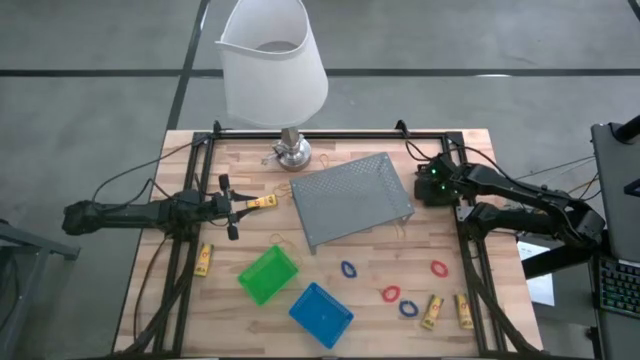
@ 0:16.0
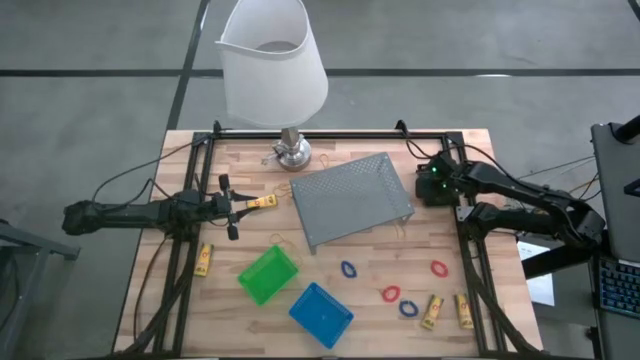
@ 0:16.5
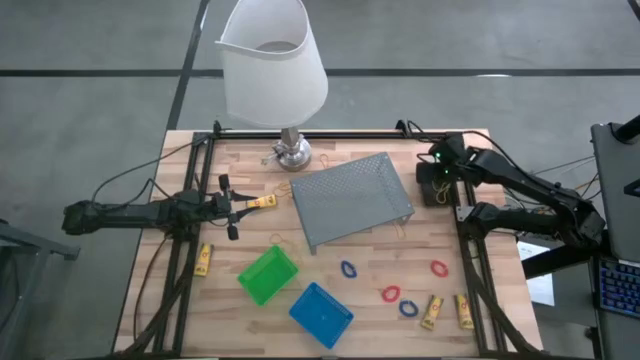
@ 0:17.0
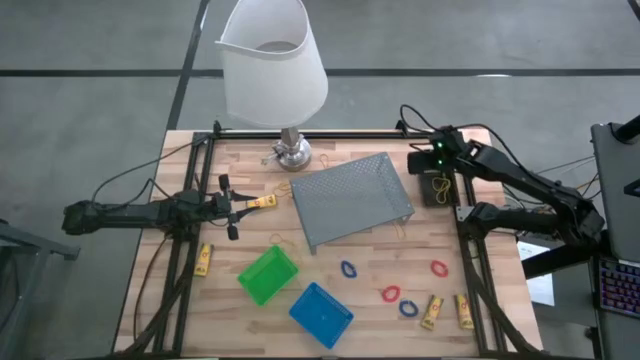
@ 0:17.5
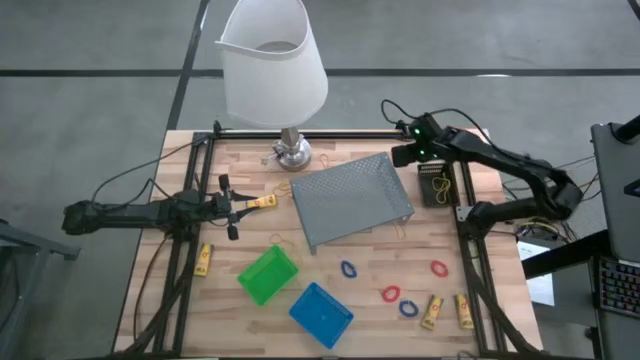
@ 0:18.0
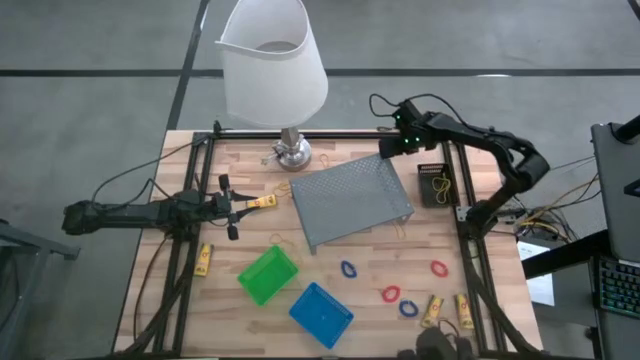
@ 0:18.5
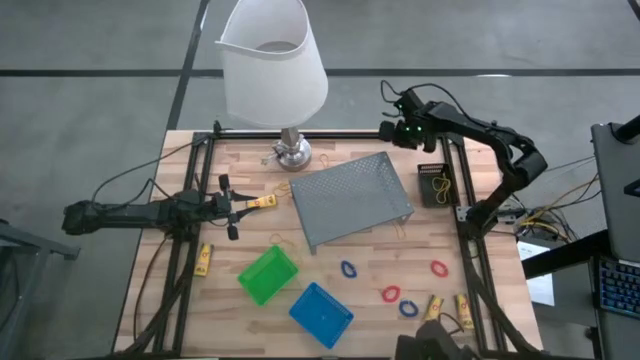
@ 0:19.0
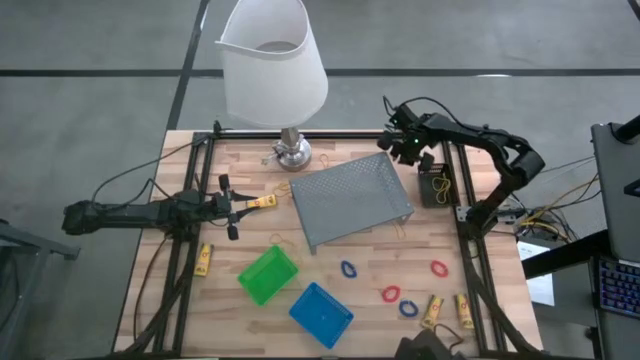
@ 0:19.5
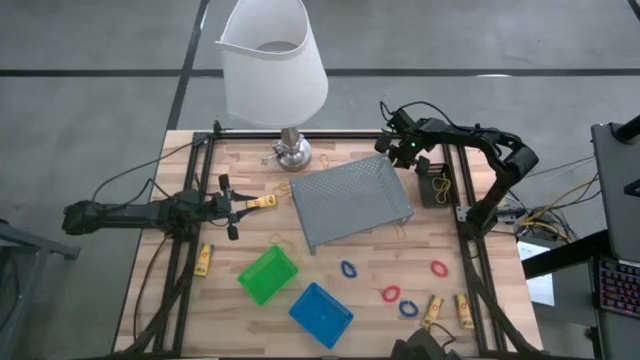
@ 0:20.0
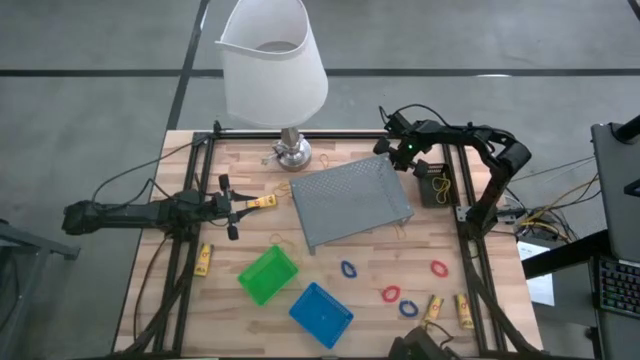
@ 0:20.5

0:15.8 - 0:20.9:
Task: Pick & Place Office Desk Supplies
Put the yellow rubber band into the black basket

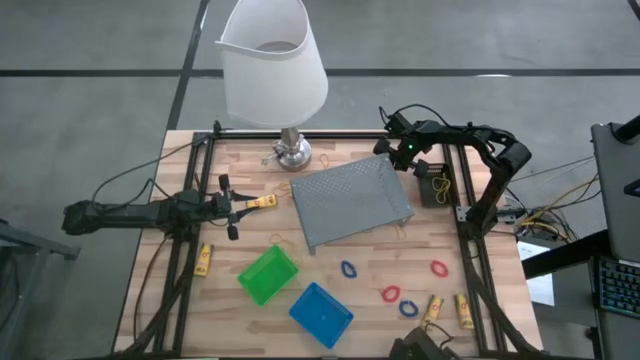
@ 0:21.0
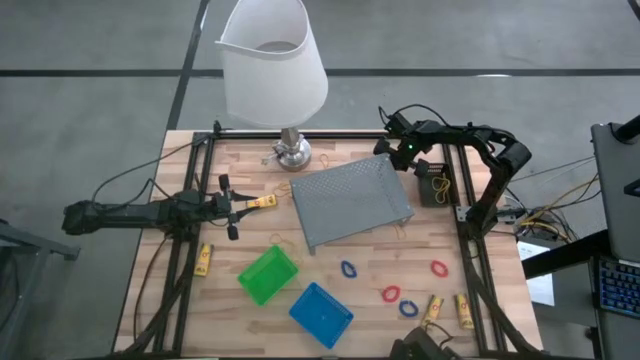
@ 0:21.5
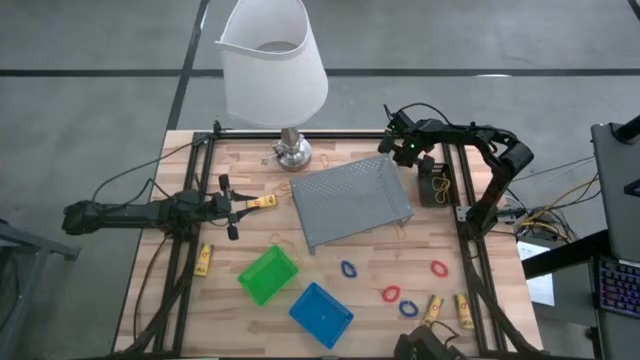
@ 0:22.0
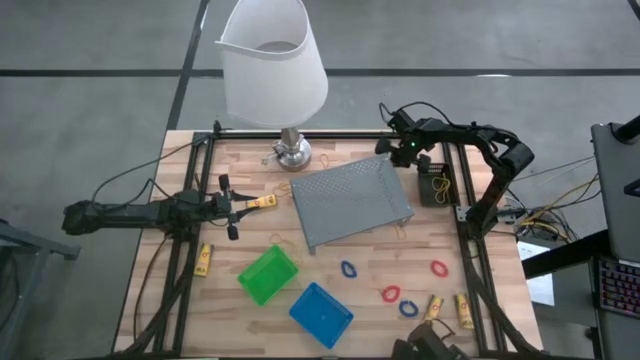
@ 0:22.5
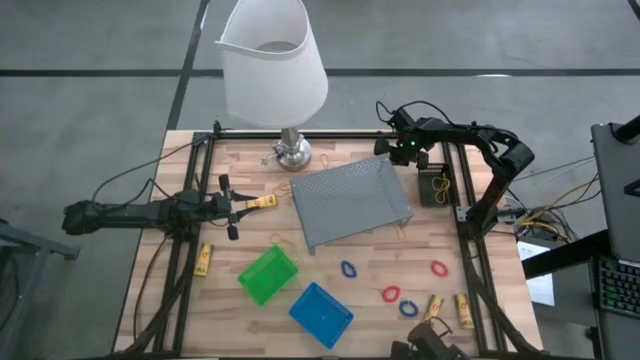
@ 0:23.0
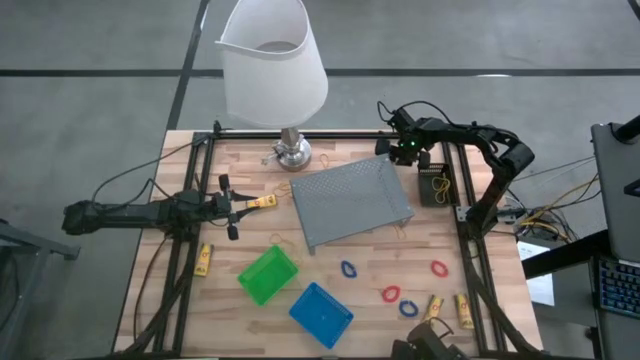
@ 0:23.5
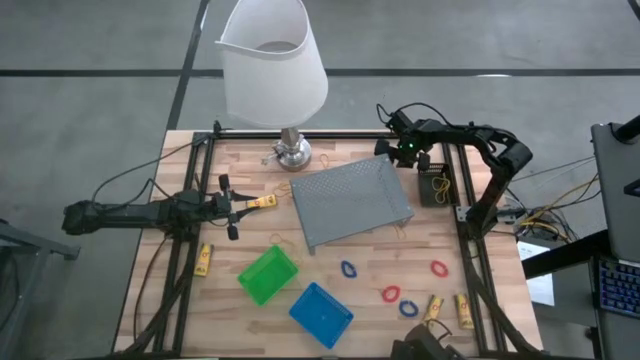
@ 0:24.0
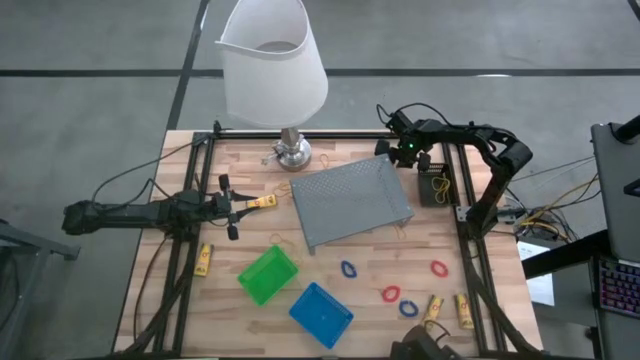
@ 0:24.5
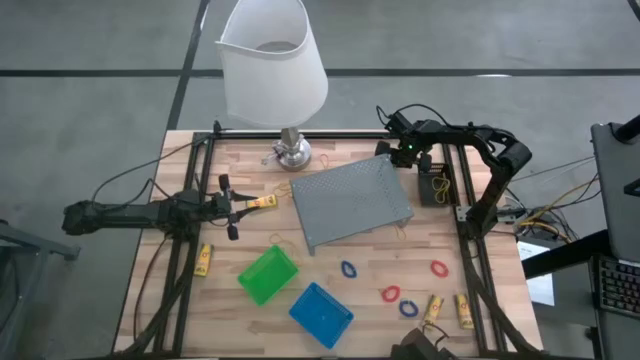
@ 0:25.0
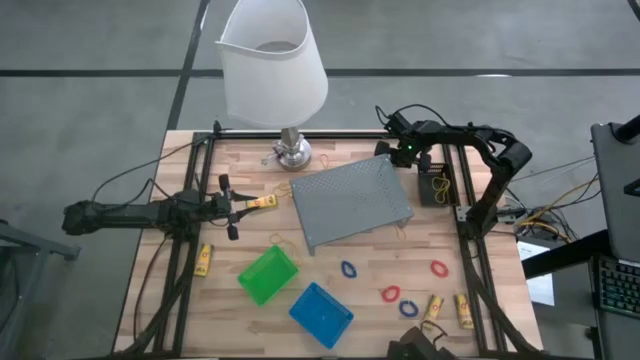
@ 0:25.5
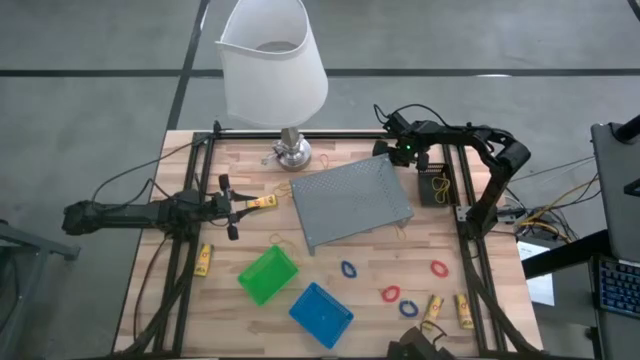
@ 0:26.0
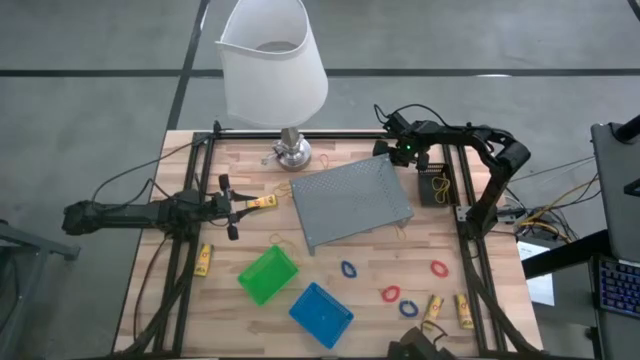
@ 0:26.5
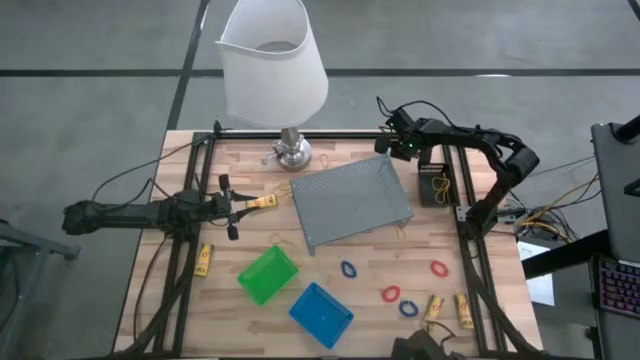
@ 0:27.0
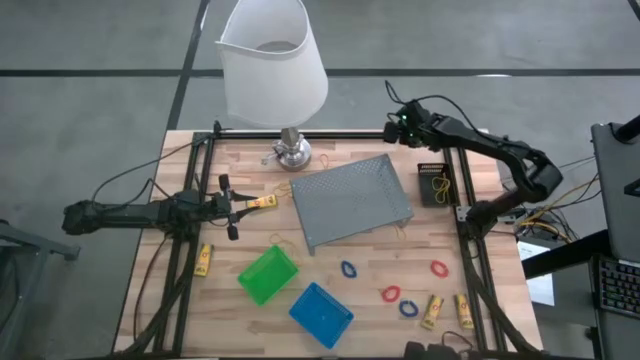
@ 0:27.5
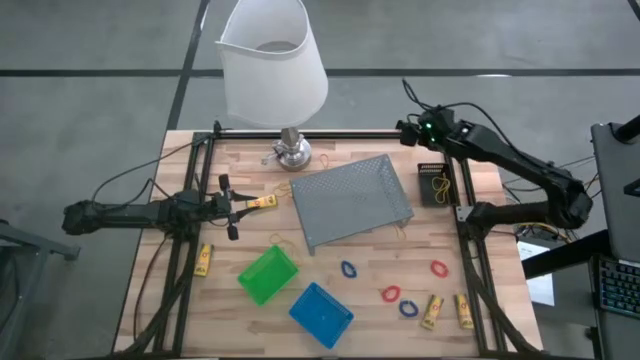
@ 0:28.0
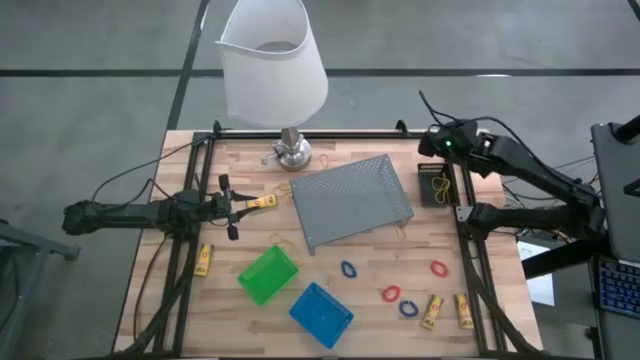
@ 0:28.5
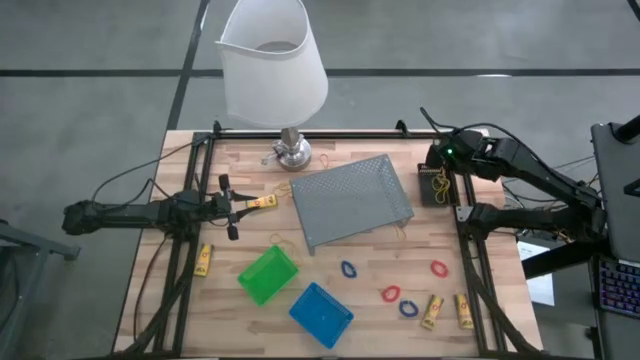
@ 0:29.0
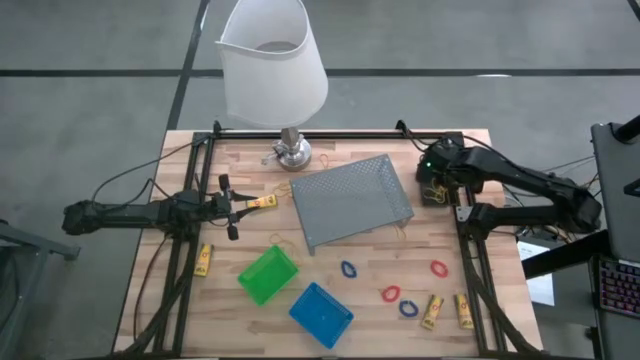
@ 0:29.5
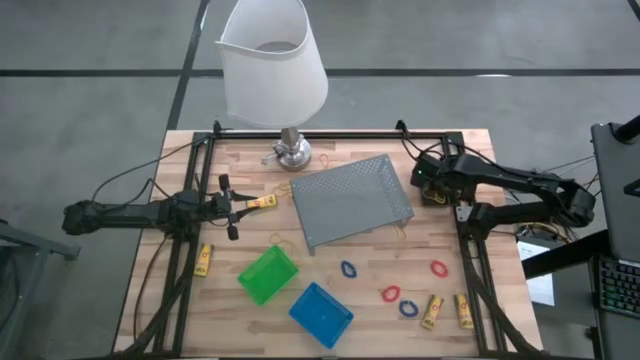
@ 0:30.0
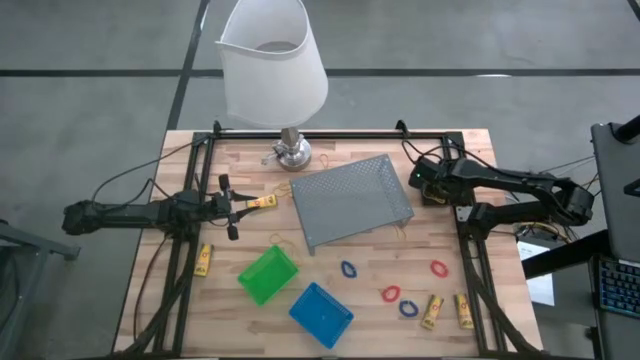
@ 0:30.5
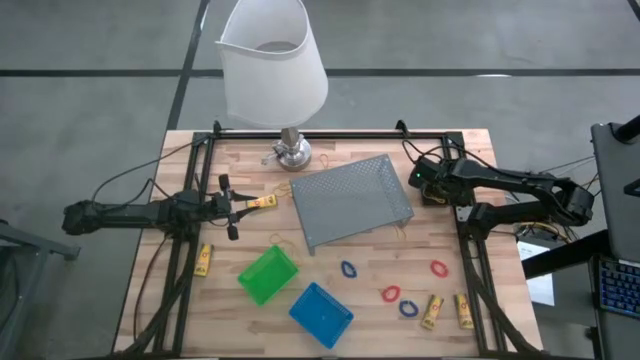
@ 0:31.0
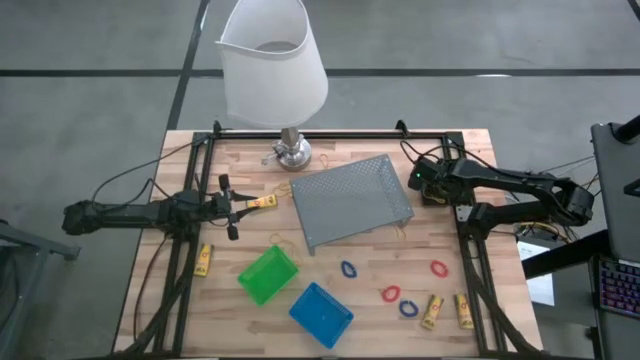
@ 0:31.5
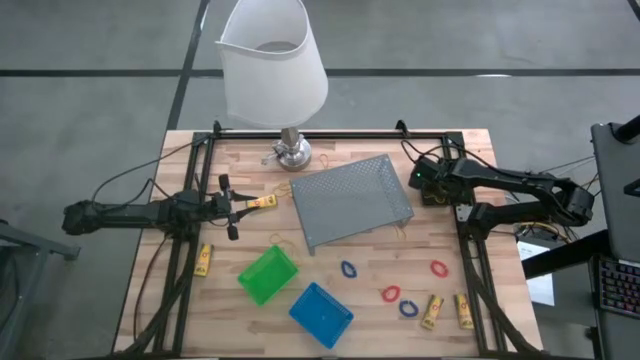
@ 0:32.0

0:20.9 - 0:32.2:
Put the yellow rubber band into the black basket

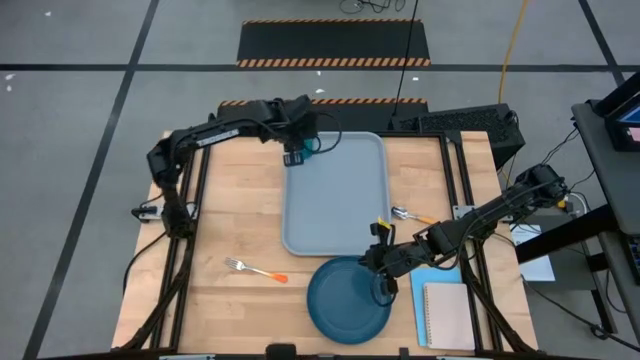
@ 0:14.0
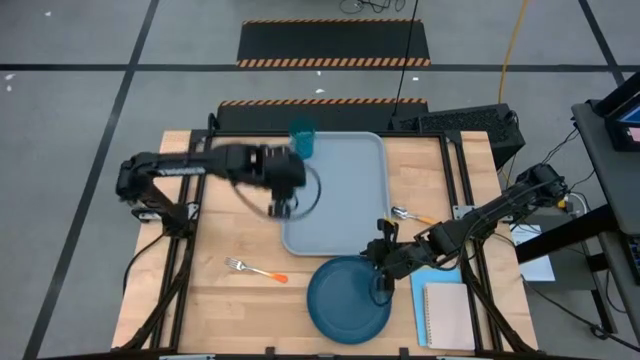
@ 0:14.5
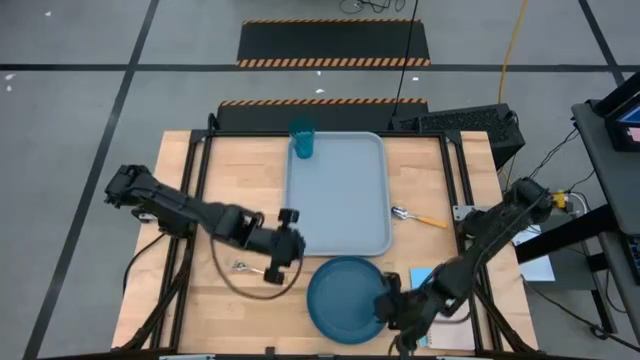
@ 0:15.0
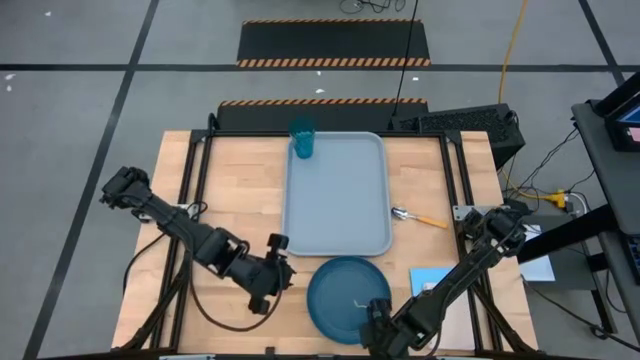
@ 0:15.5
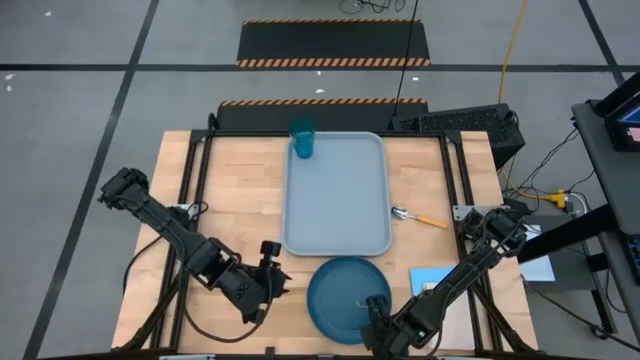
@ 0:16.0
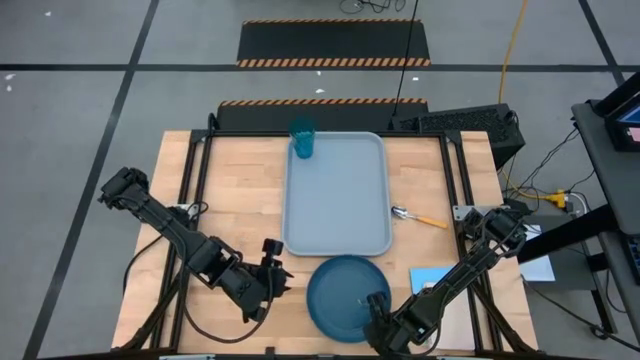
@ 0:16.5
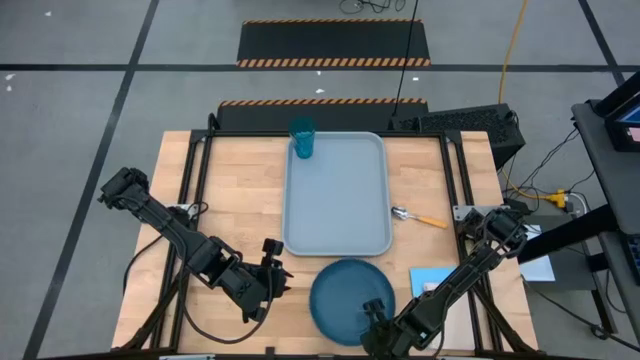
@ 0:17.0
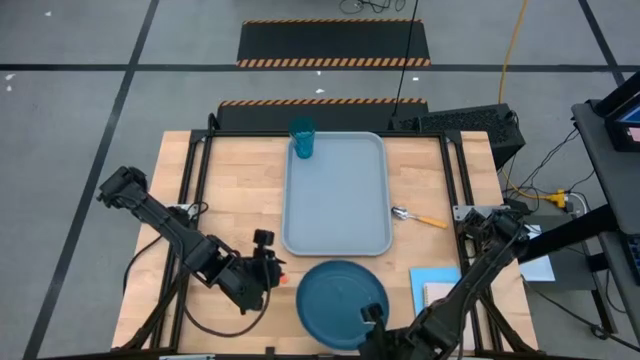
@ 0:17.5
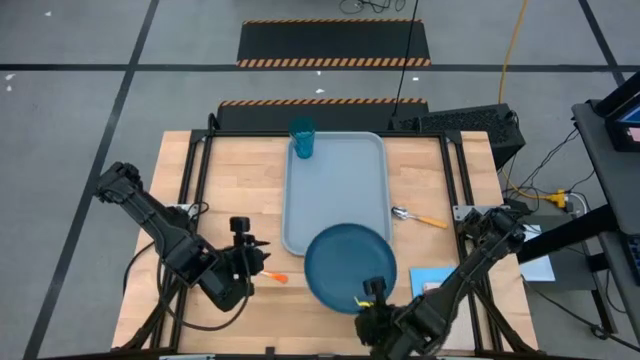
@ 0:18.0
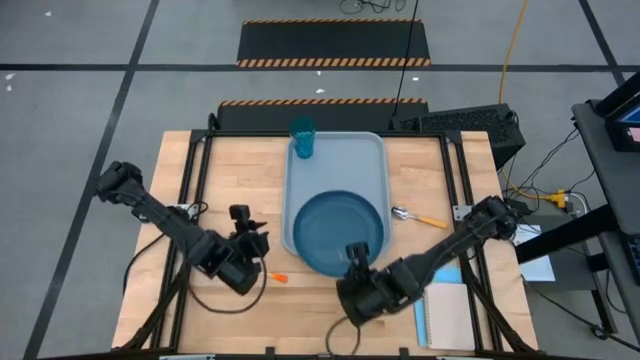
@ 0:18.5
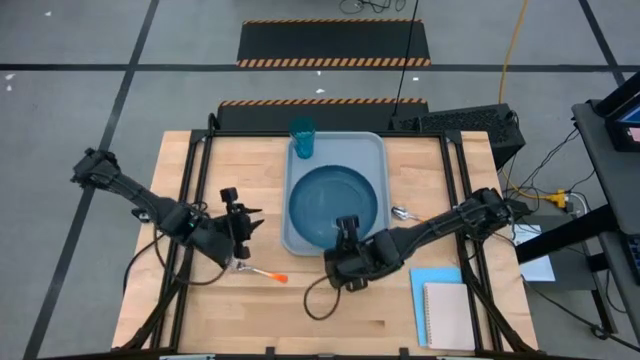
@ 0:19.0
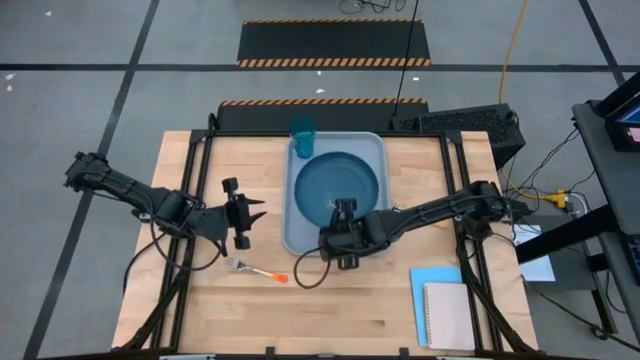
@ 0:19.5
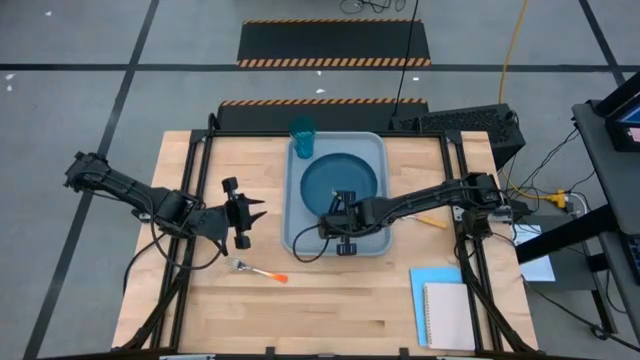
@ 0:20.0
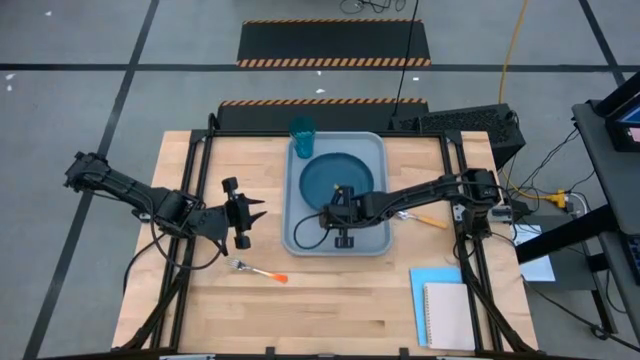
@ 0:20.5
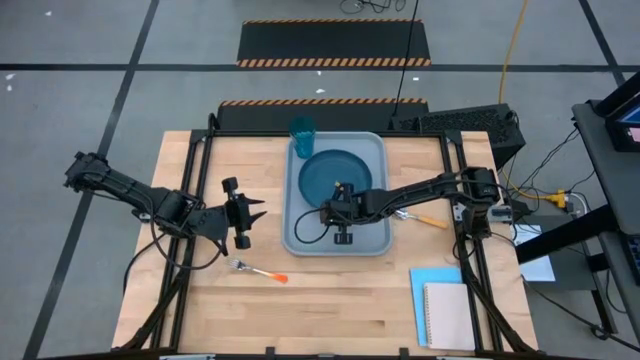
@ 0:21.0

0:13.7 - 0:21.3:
Task: Pick and place plate/cup/fork/spoon on tray
Put the blue plate on the gray serving tray to the bottom left of the blue glass
